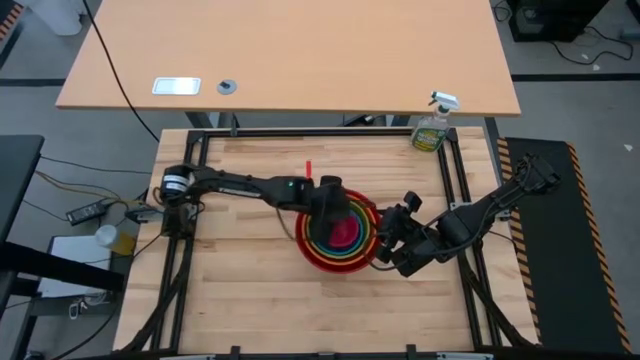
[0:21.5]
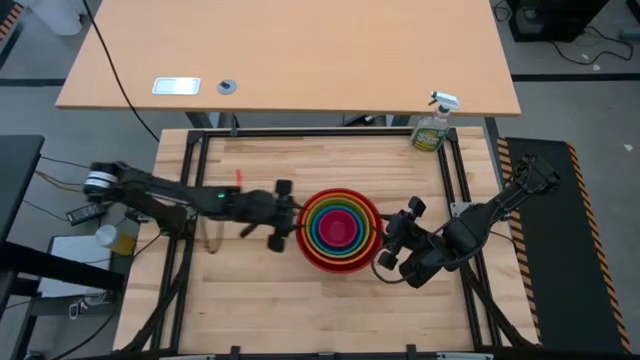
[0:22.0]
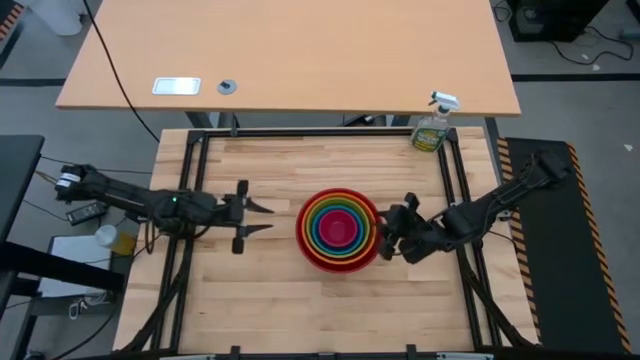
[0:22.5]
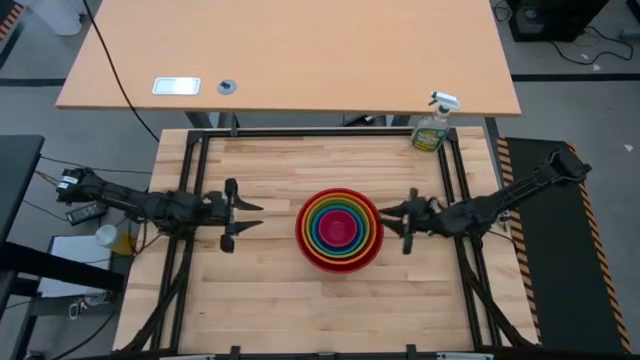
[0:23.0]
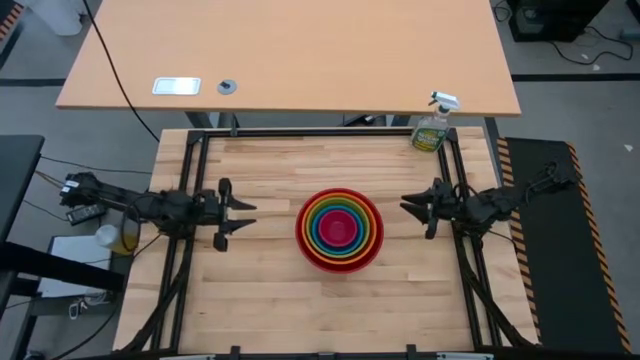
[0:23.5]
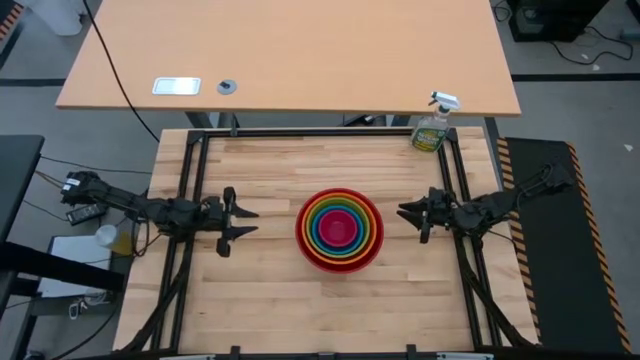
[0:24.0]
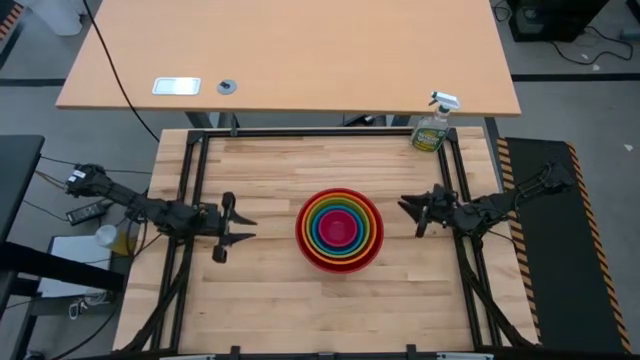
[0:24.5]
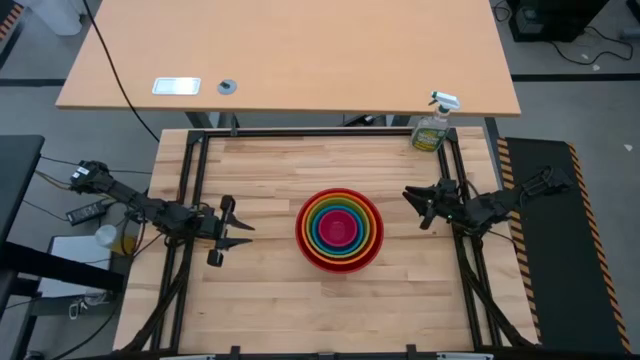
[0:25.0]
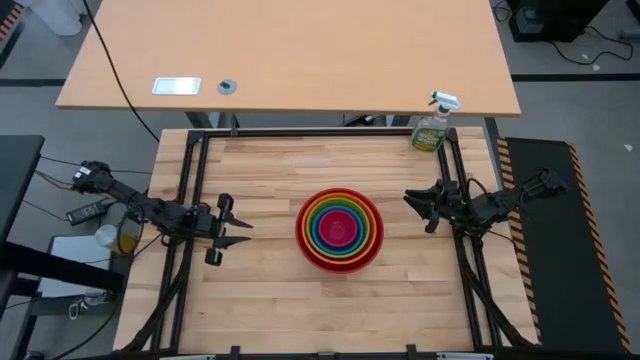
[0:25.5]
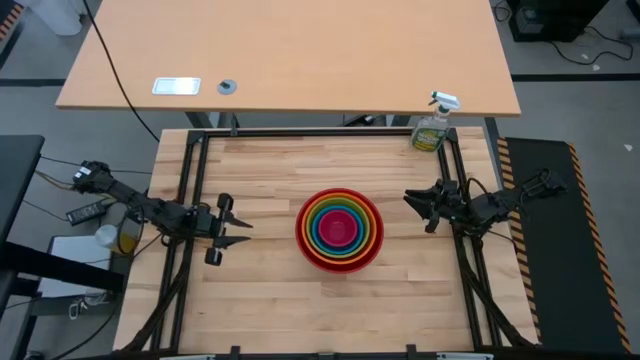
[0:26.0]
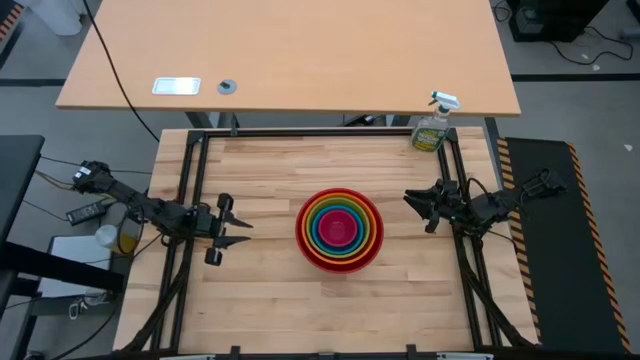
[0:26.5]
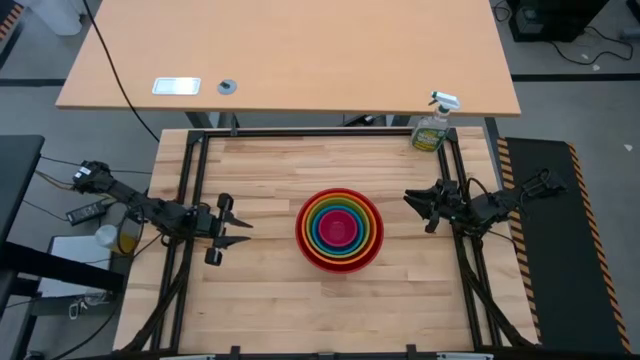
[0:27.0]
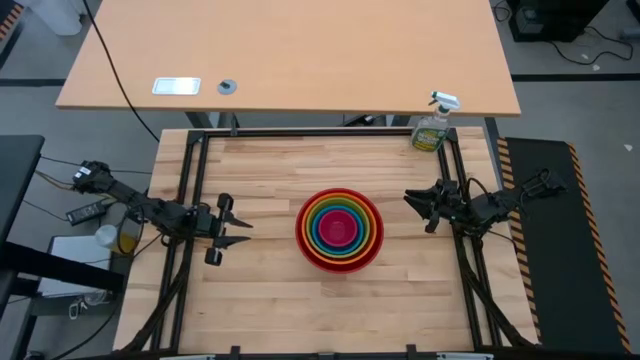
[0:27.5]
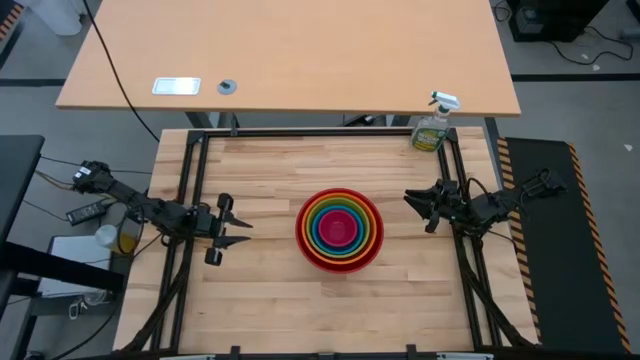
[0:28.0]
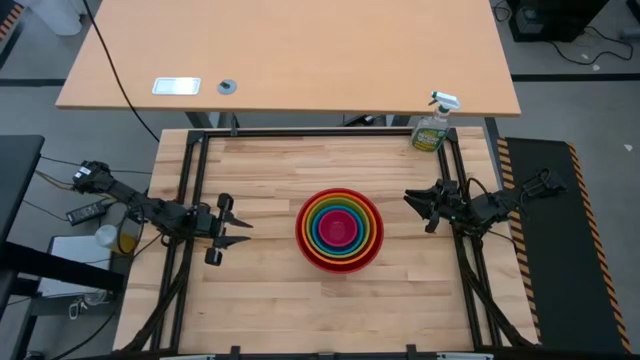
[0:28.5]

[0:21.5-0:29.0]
Return to Home Position
